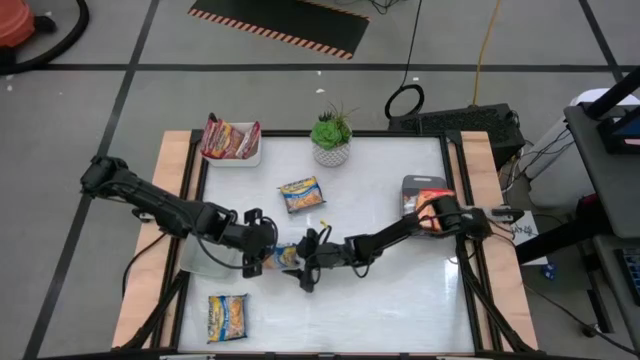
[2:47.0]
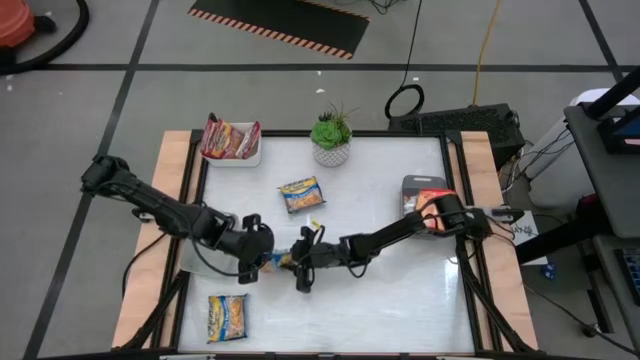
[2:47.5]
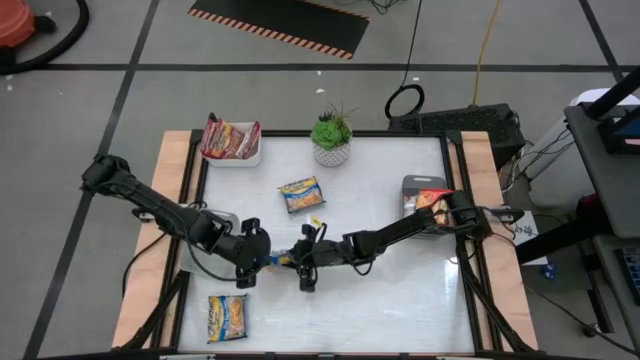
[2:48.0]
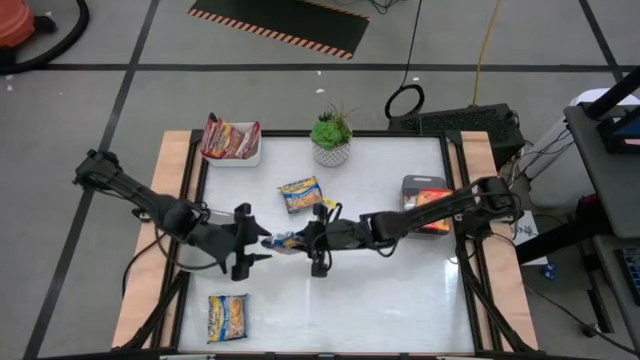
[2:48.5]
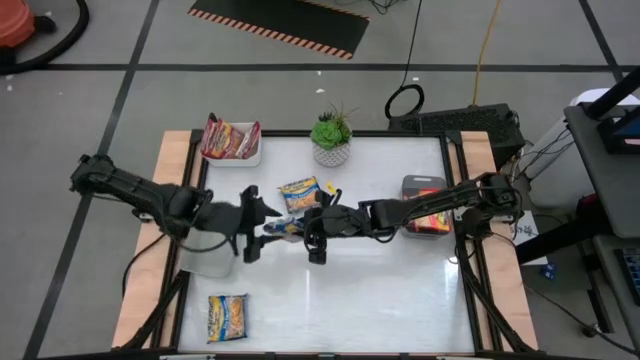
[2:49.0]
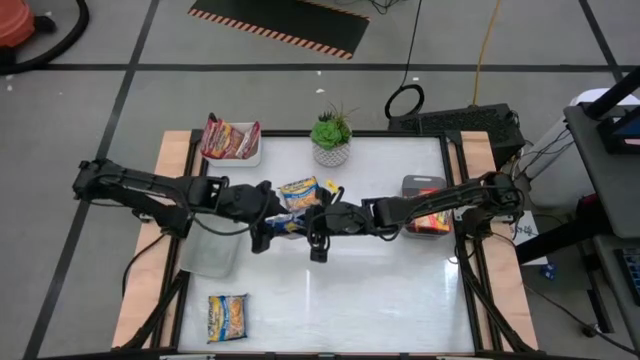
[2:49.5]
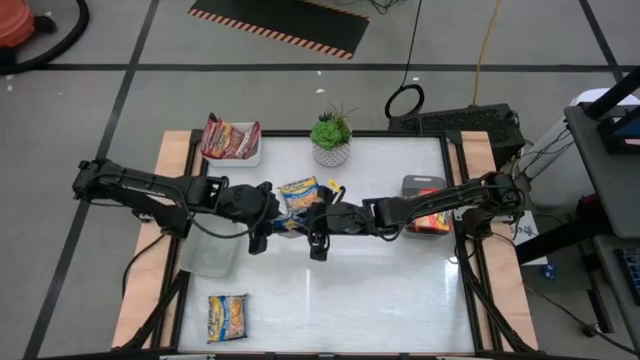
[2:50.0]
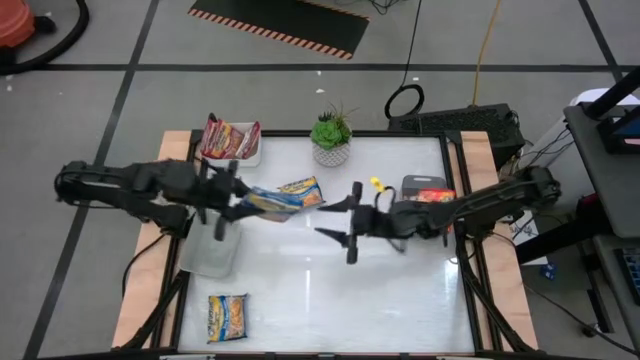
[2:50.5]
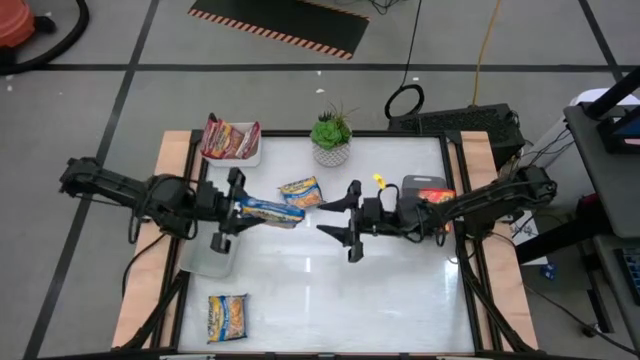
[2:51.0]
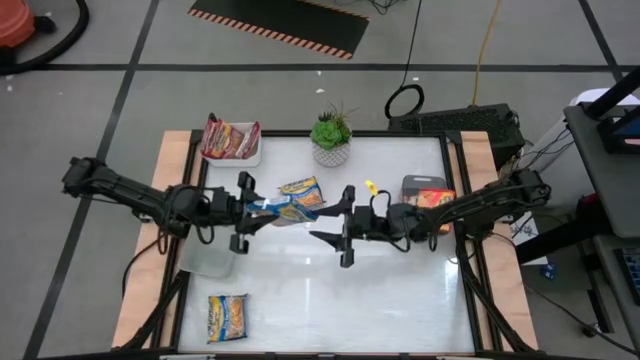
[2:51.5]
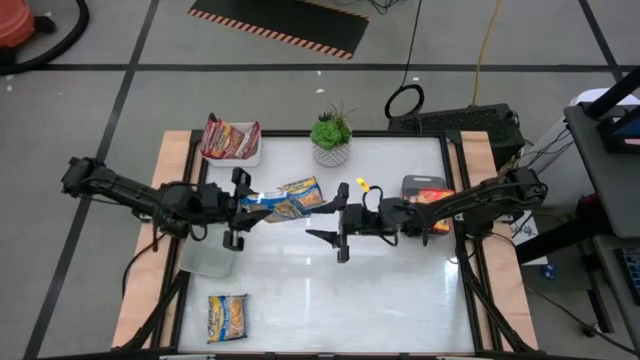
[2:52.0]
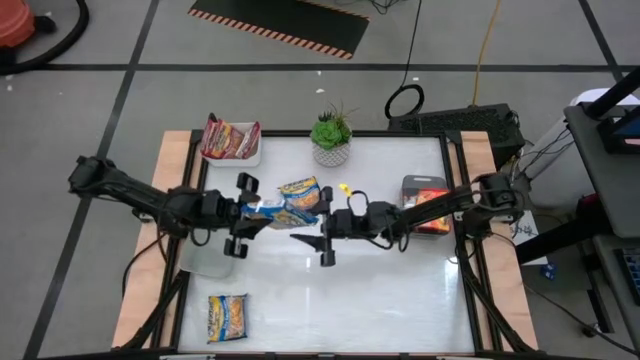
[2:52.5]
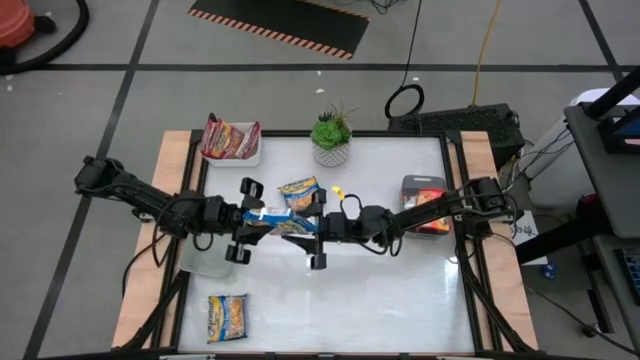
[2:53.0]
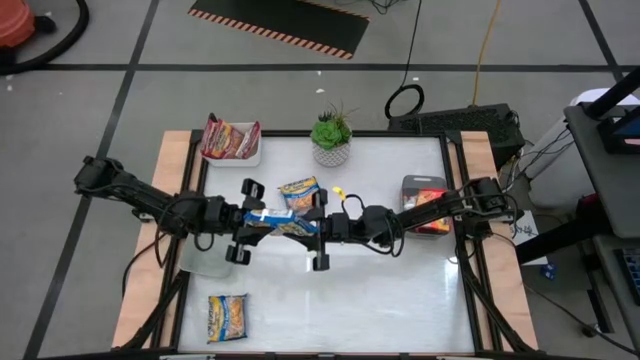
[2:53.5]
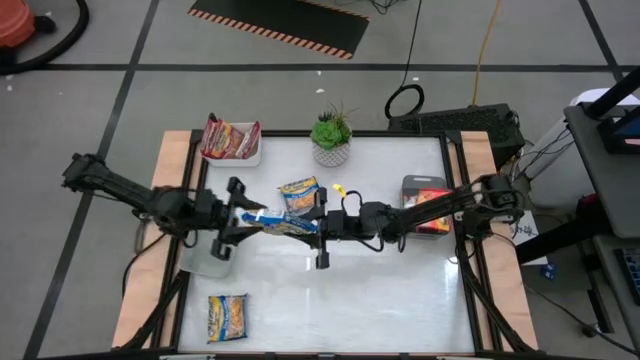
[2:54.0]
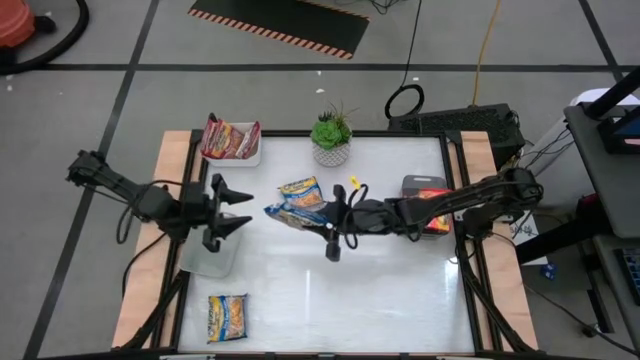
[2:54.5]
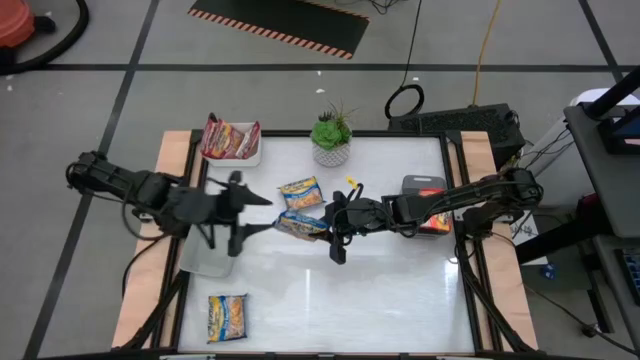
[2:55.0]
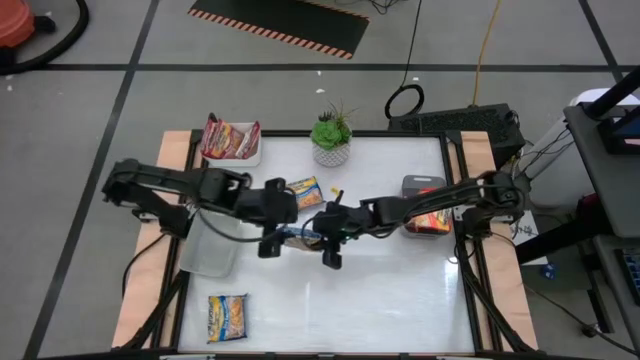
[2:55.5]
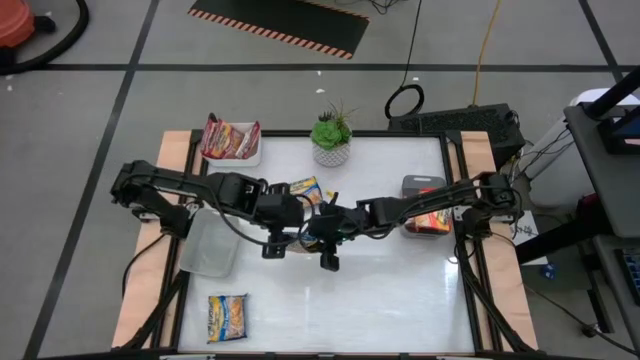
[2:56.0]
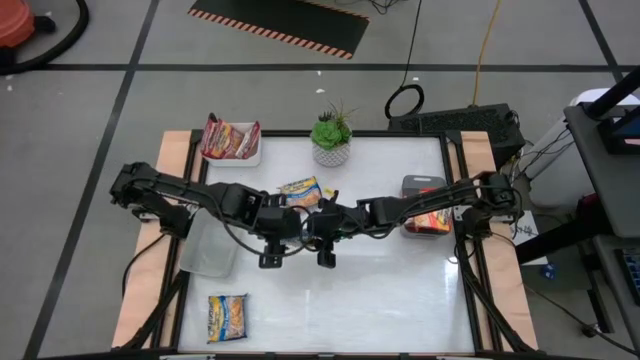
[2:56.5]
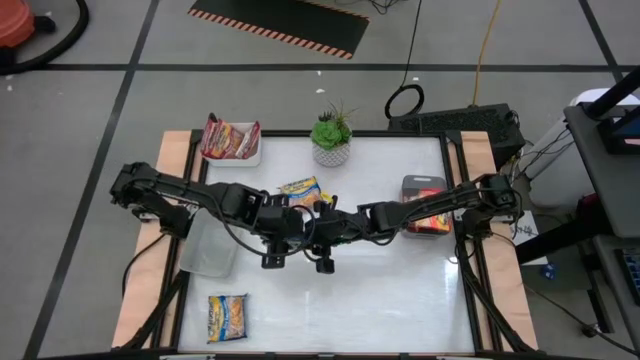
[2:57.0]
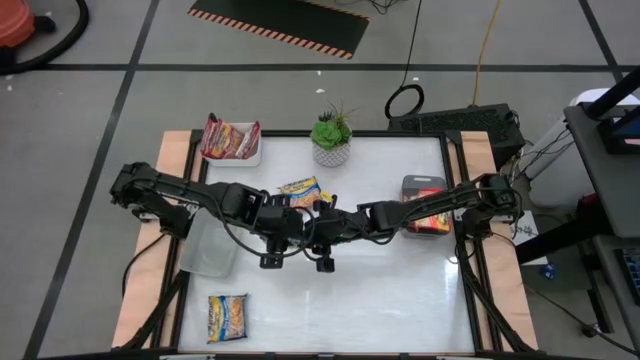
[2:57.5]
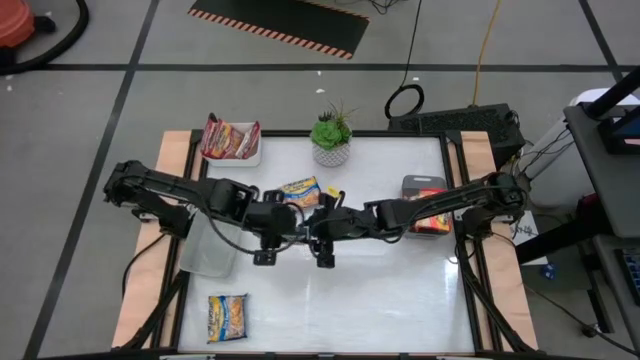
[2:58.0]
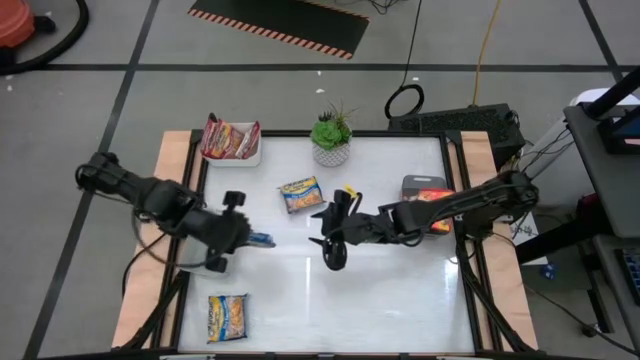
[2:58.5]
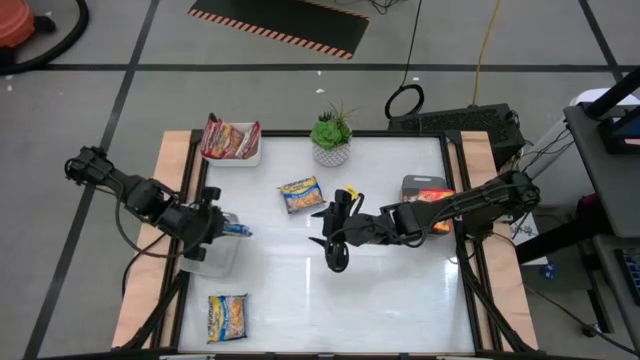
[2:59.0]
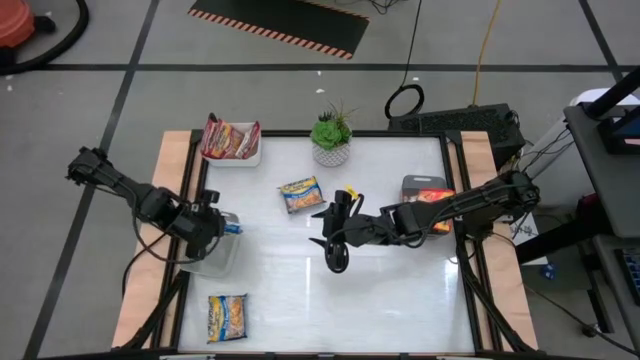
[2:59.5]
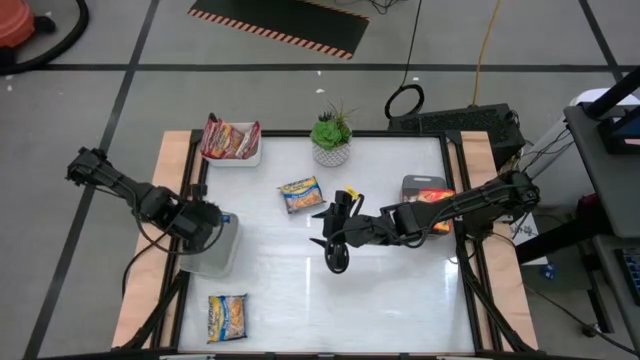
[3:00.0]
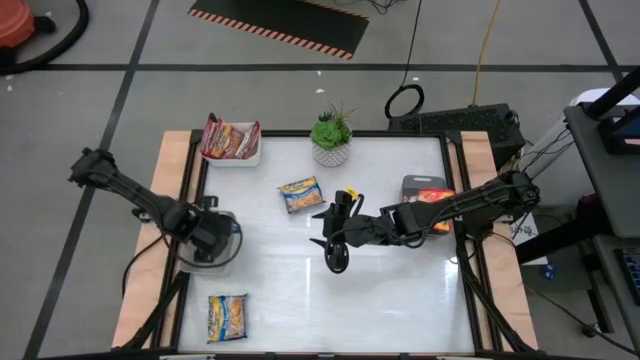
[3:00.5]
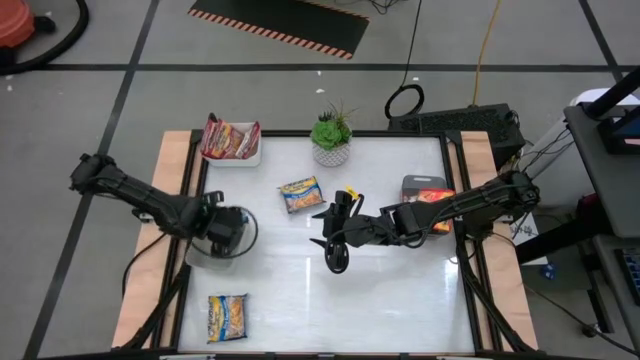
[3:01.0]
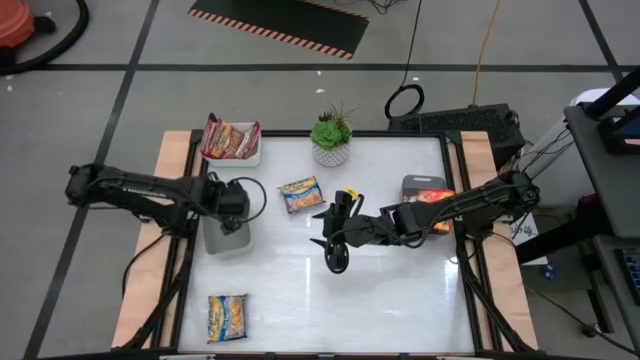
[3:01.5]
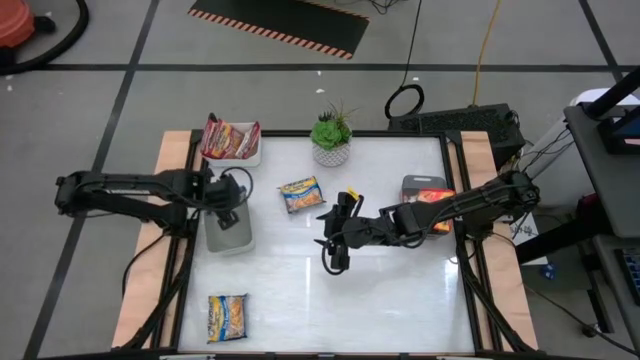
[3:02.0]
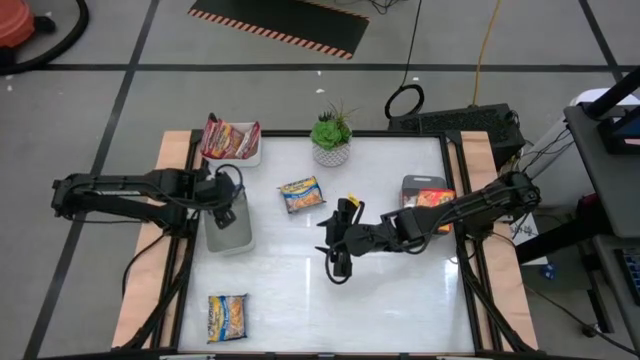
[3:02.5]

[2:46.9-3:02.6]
Task: Sort Maruchan noodles
Put the middle blue noodle pack into the gray bin

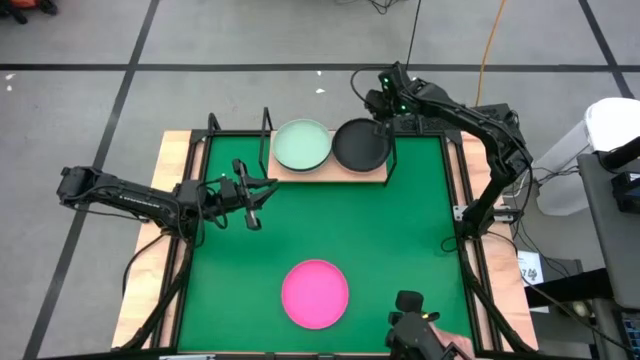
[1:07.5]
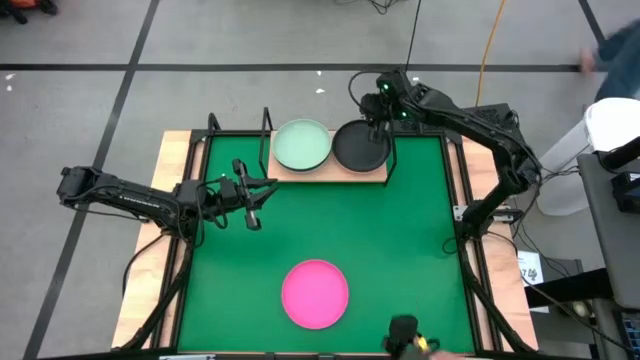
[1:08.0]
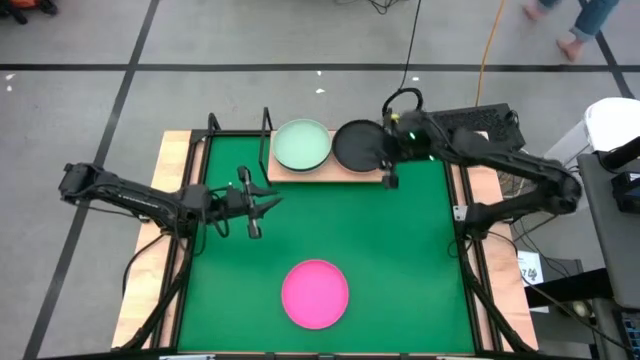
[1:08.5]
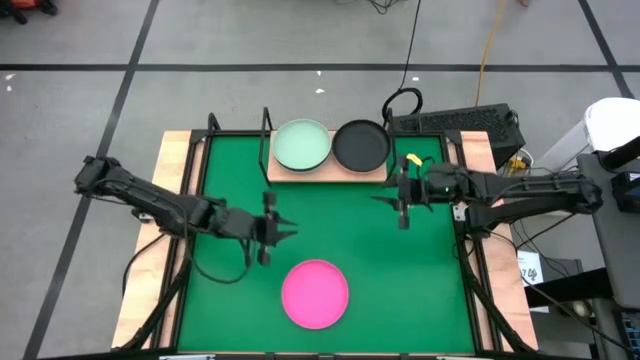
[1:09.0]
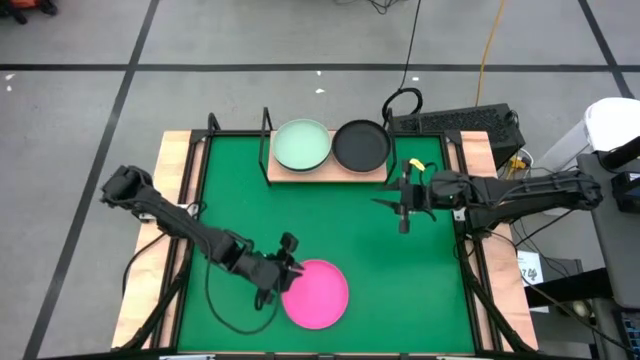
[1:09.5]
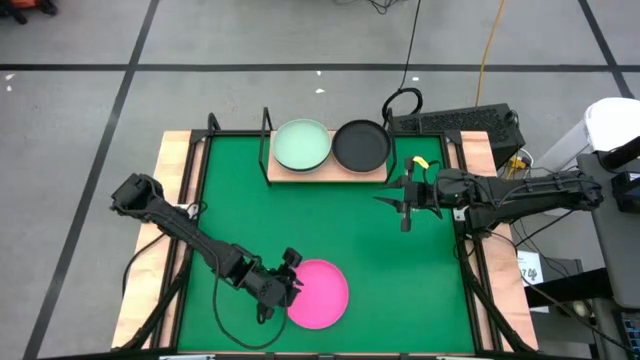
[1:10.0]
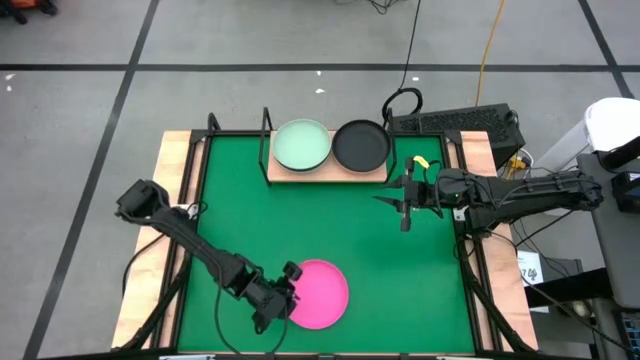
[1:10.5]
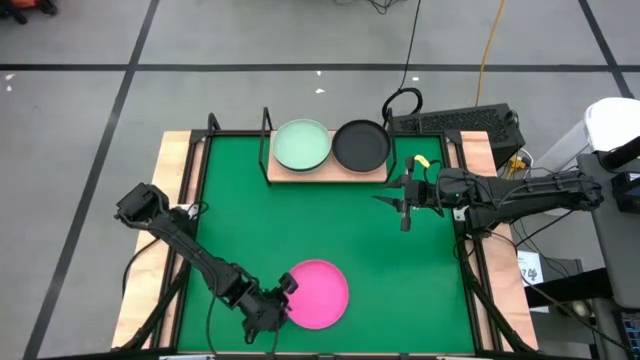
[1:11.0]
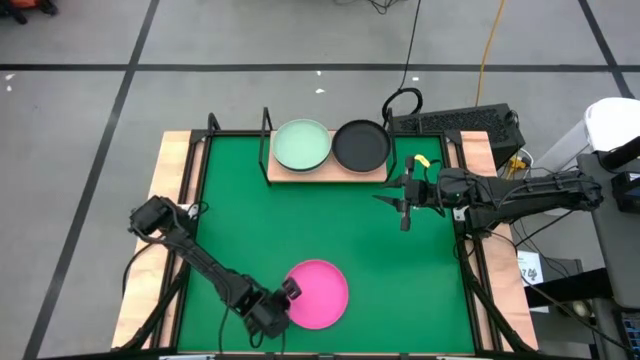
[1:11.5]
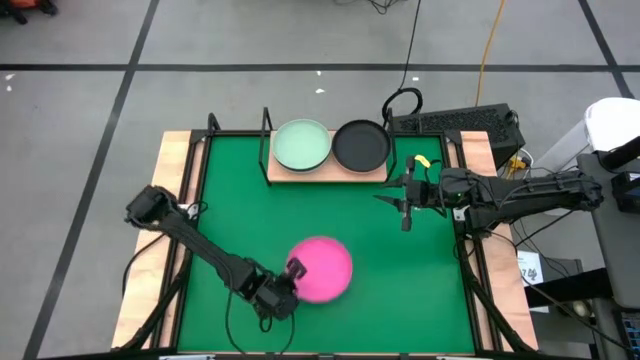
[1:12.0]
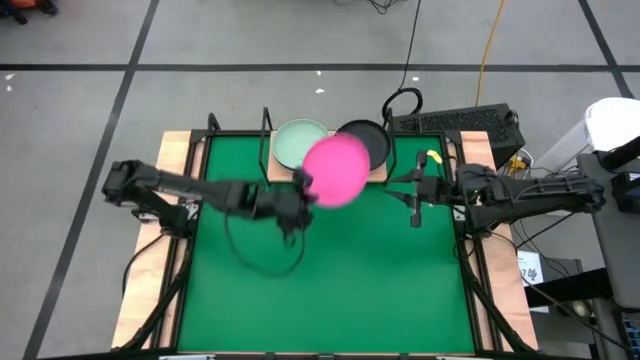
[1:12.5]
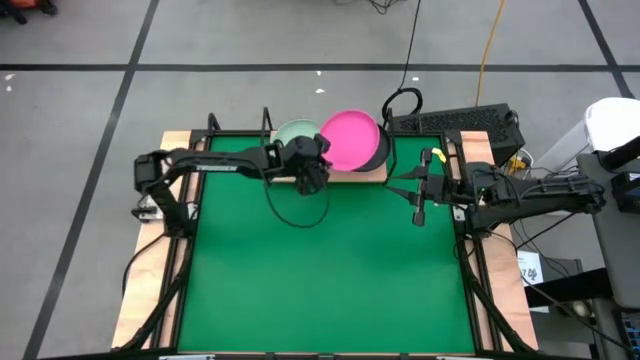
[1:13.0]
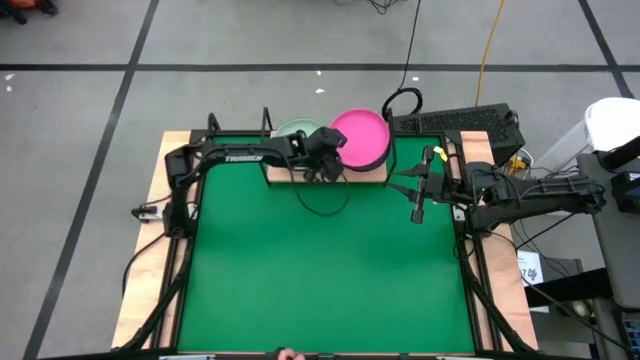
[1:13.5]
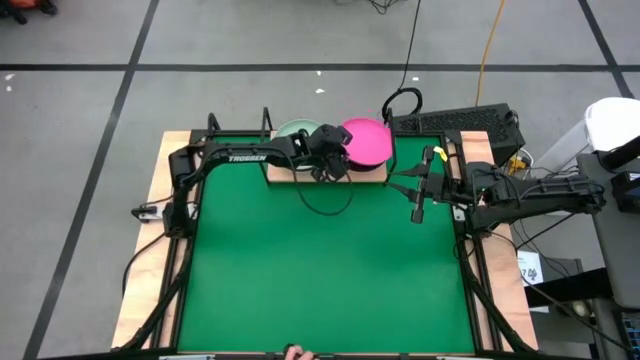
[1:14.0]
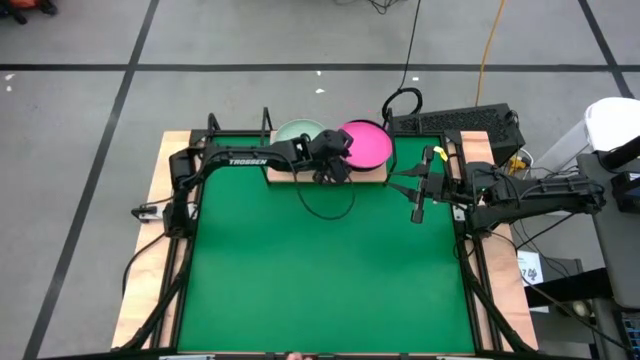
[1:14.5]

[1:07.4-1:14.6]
Task: Place and stack plates onto a shelf
Stack the pink plate on top of the black plate on the shelf
